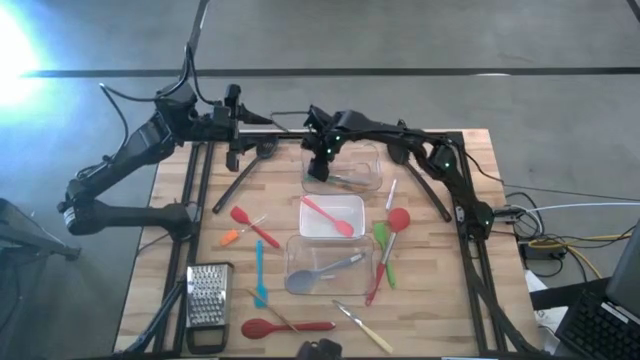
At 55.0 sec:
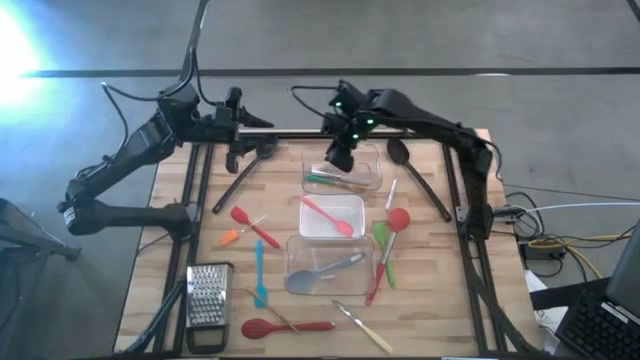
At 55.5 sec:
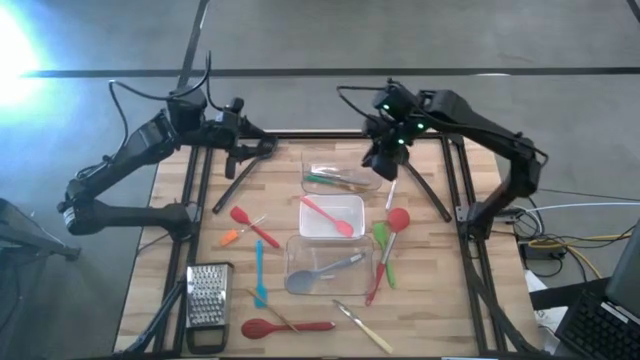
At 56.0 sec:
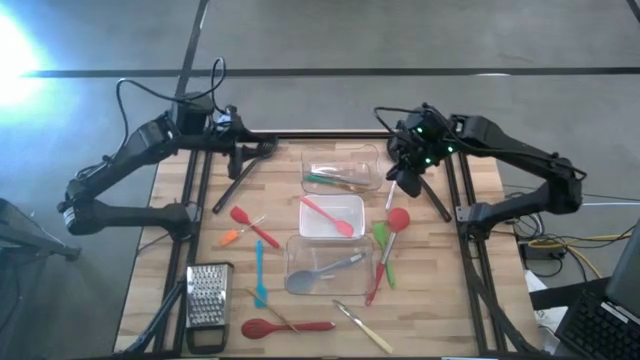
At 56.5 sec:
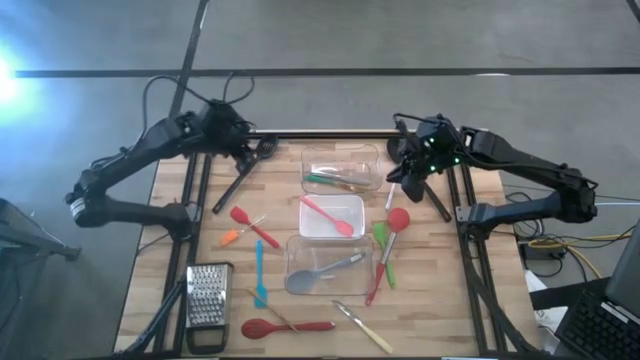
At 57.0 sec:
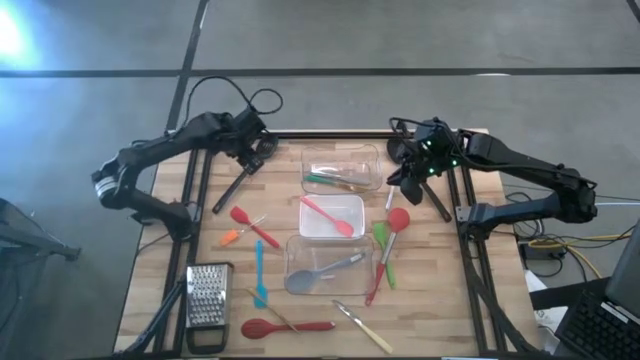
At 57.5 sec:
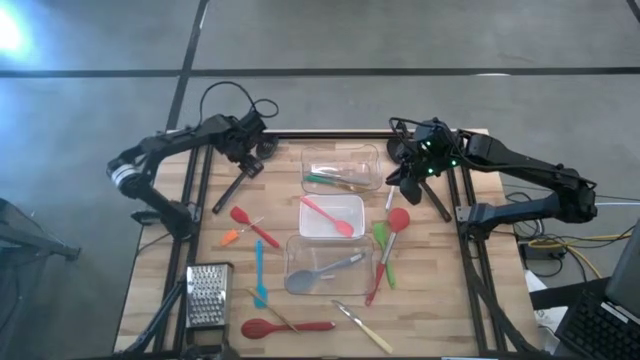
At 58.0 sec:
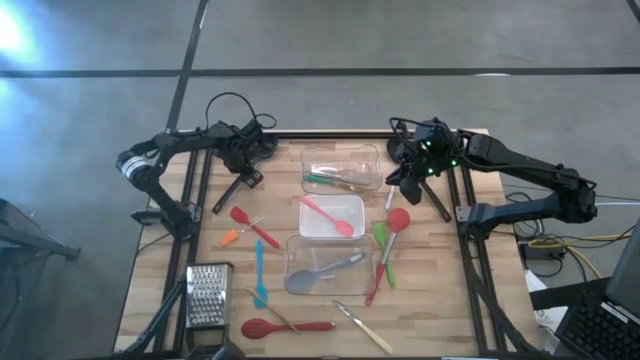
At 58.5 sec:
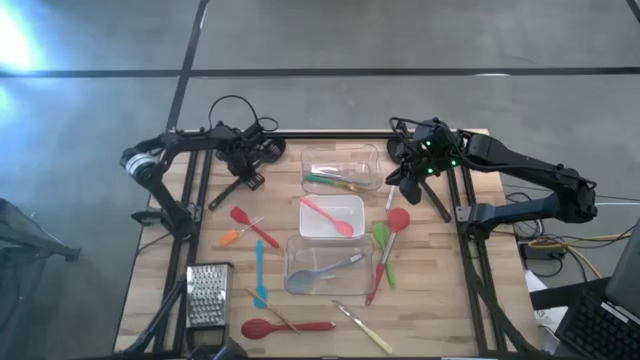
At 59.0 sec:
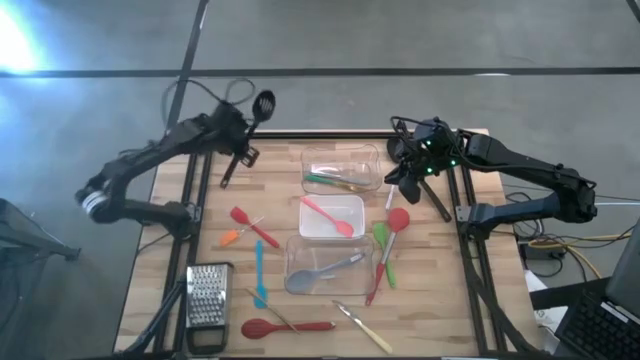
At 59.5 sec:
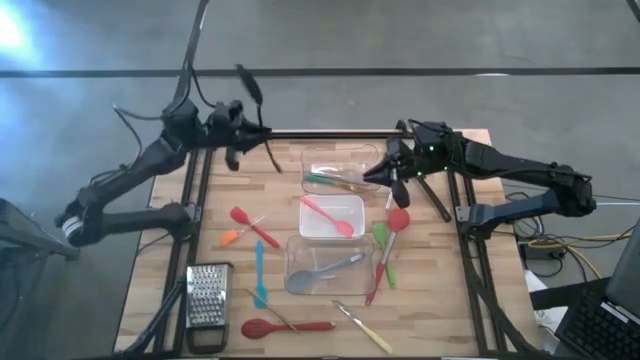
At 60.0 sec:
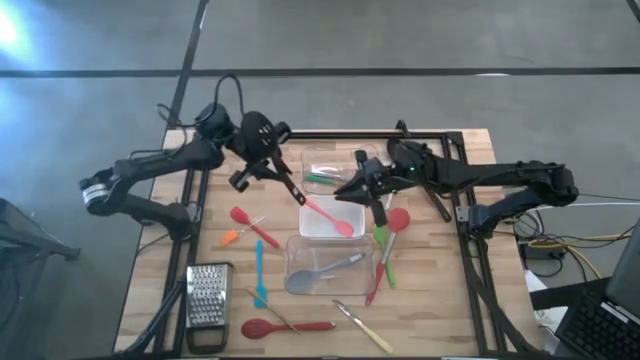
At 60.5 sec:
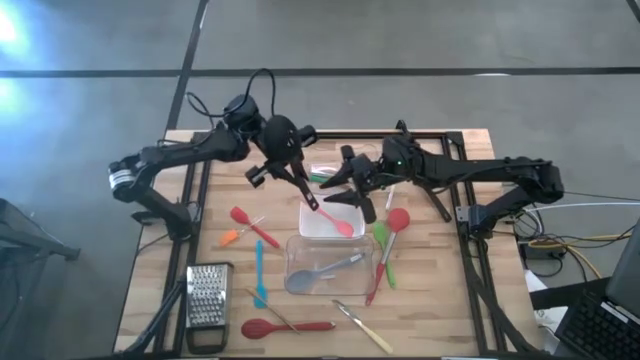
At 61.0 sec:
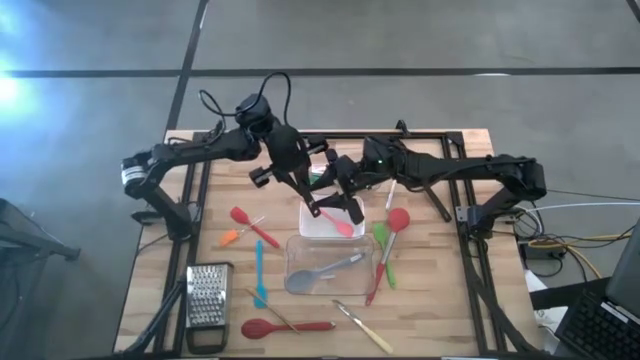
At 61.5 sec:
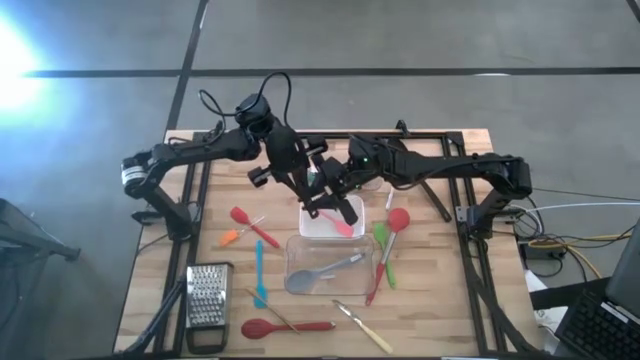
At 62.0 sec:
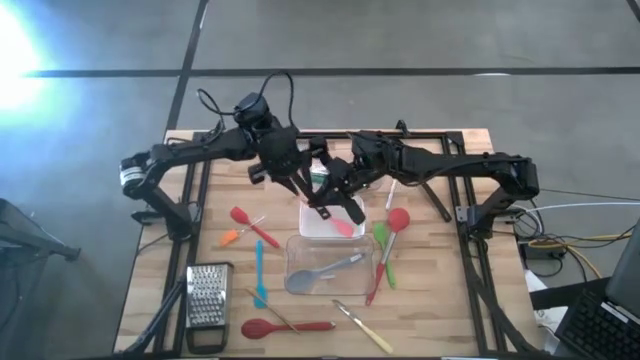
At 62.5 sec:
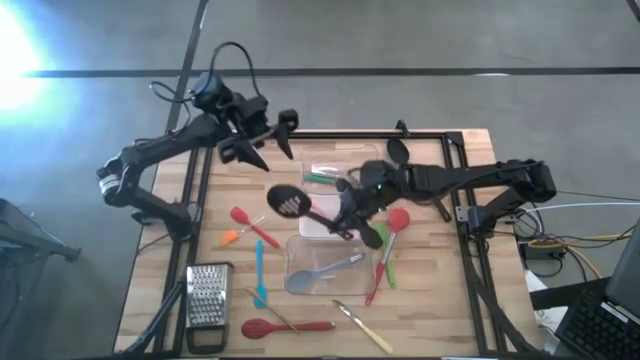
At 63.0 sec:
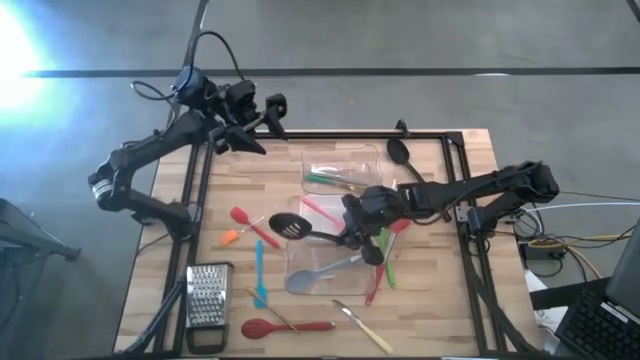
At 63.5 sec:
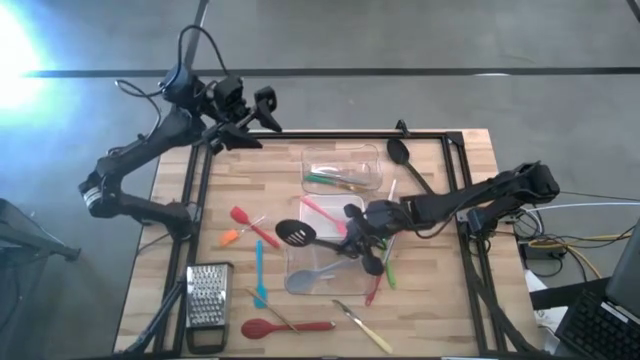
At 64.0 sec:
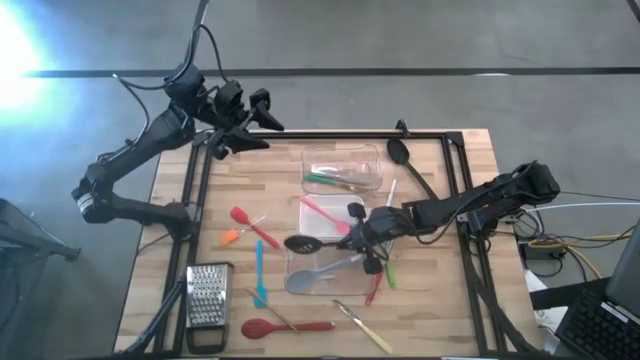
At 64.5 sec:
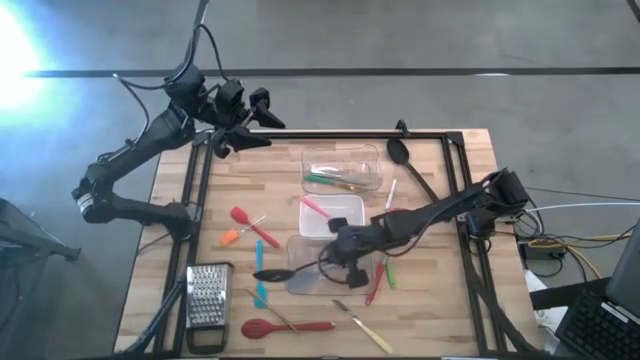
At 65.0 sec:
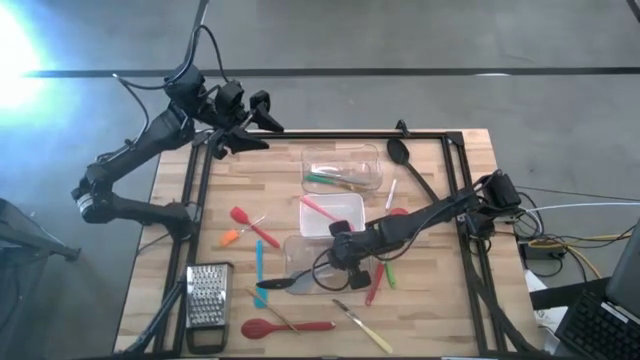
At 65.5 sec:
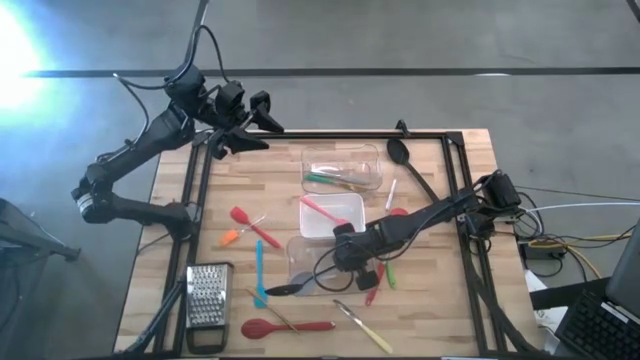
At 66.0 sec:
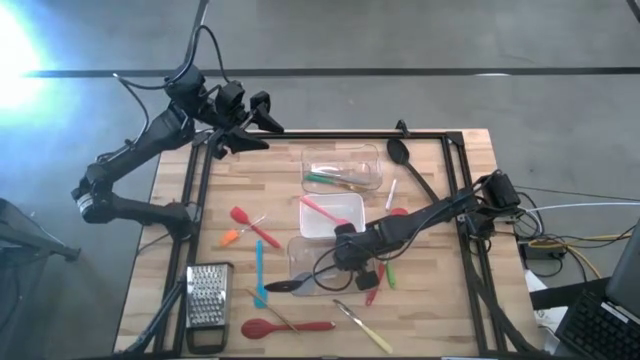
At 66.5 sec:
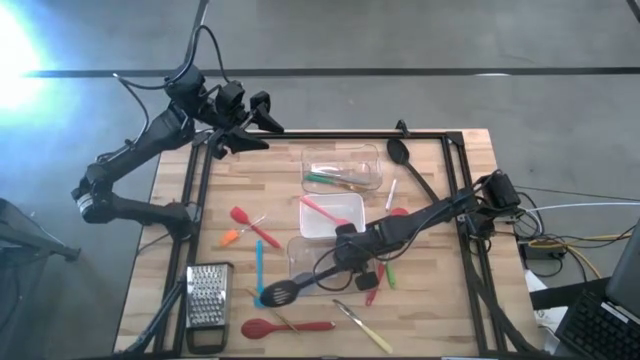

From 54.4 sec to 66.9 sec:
Task: Pick & Place Kitchen Items
Put the black slotted spoon into the bottom transparent bin

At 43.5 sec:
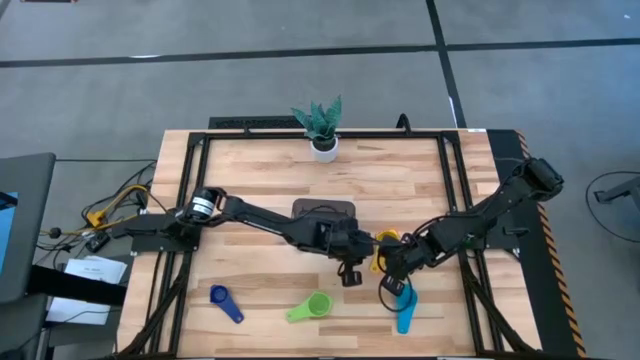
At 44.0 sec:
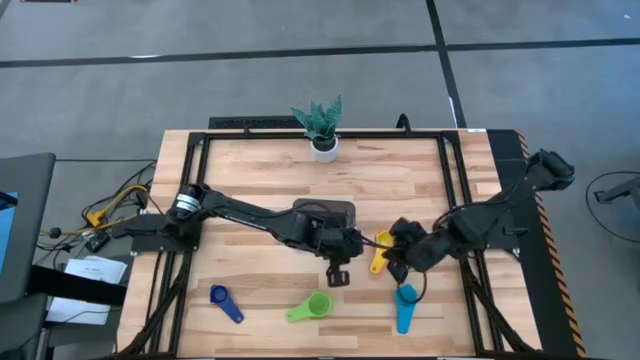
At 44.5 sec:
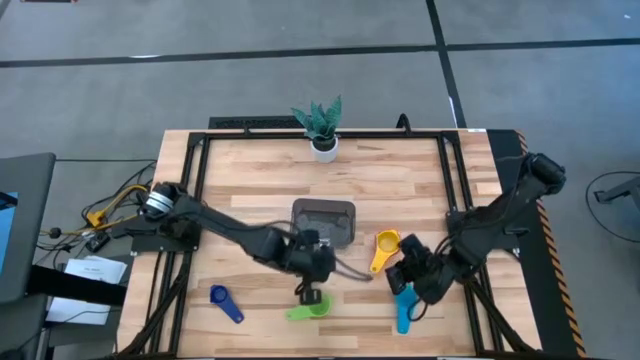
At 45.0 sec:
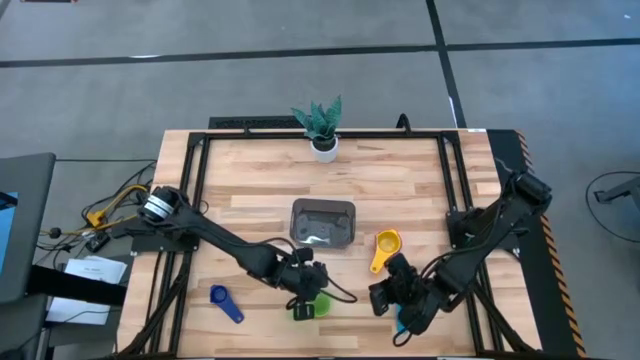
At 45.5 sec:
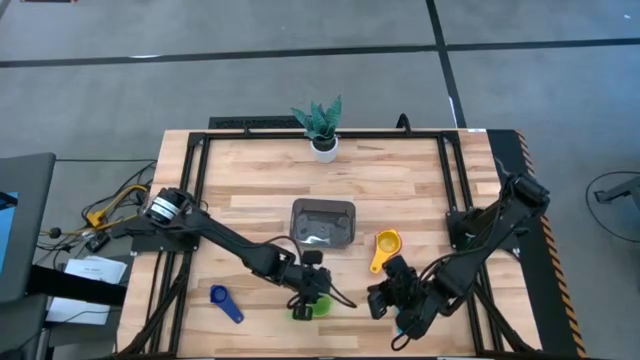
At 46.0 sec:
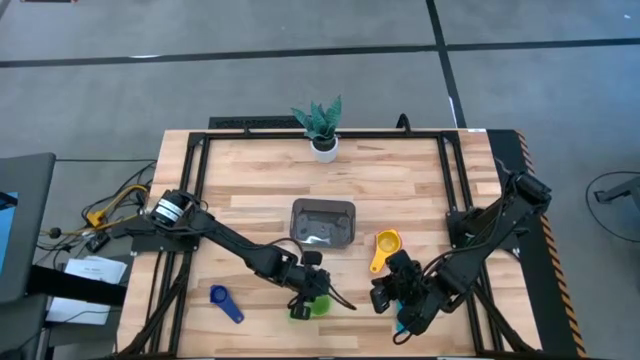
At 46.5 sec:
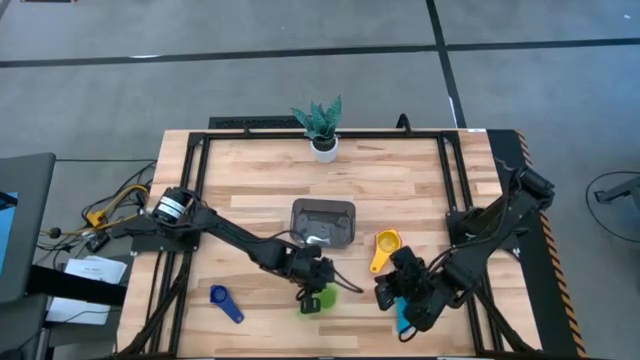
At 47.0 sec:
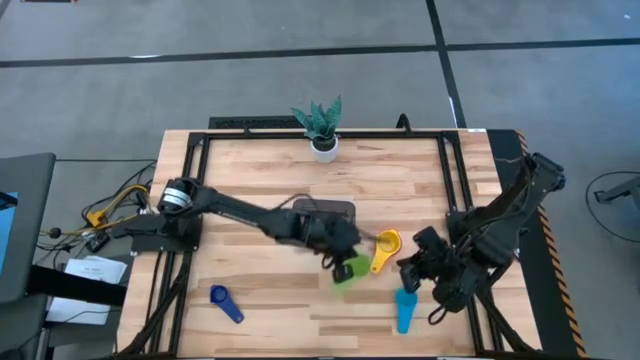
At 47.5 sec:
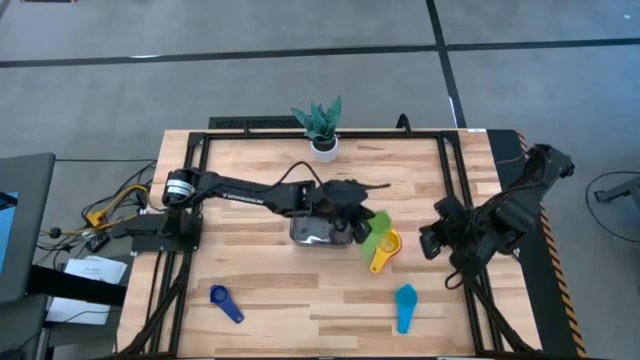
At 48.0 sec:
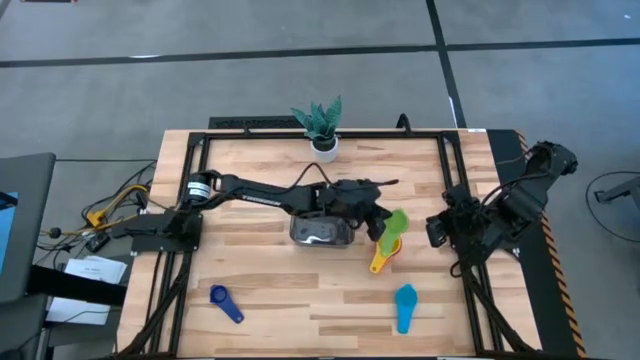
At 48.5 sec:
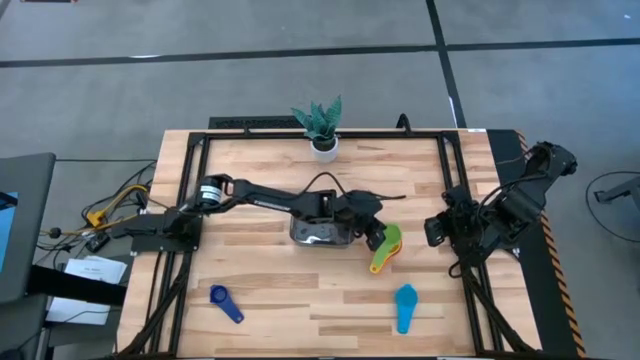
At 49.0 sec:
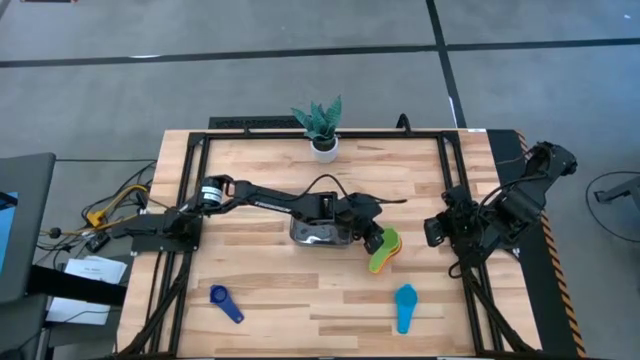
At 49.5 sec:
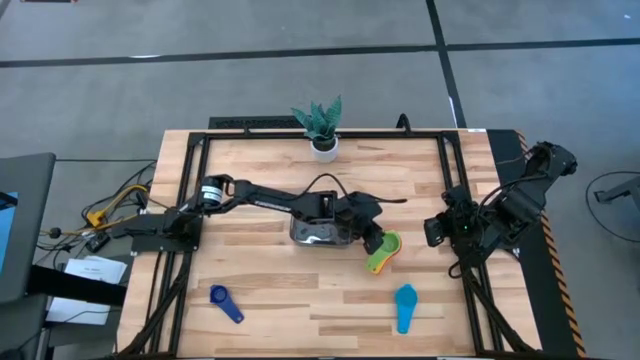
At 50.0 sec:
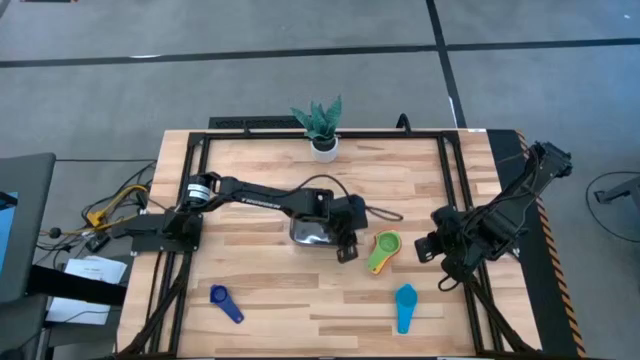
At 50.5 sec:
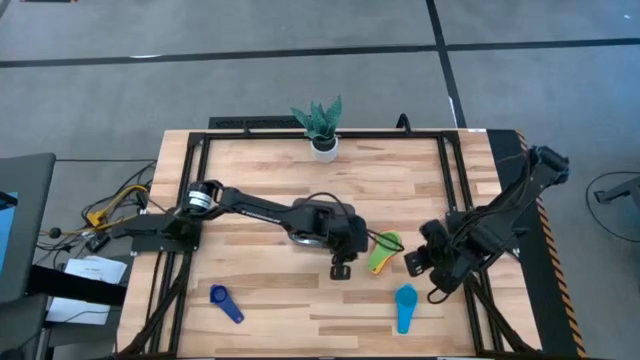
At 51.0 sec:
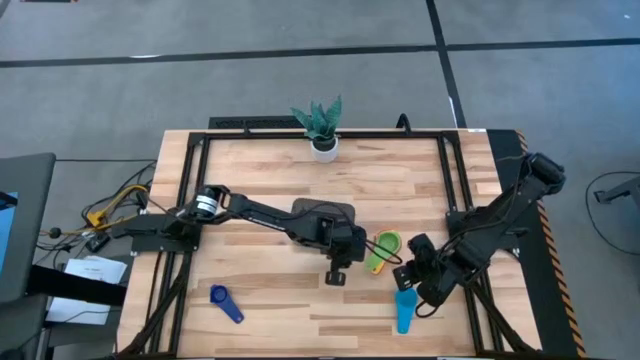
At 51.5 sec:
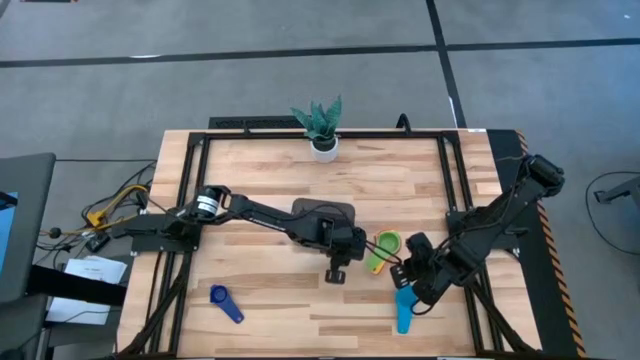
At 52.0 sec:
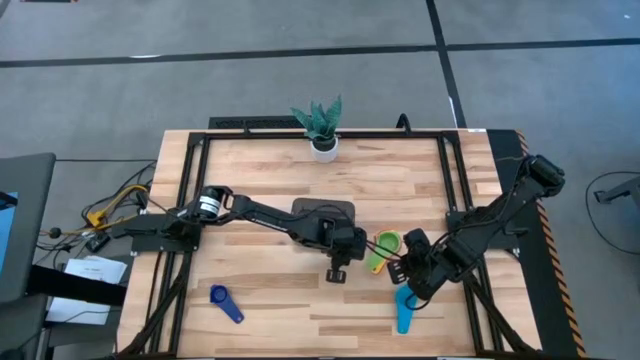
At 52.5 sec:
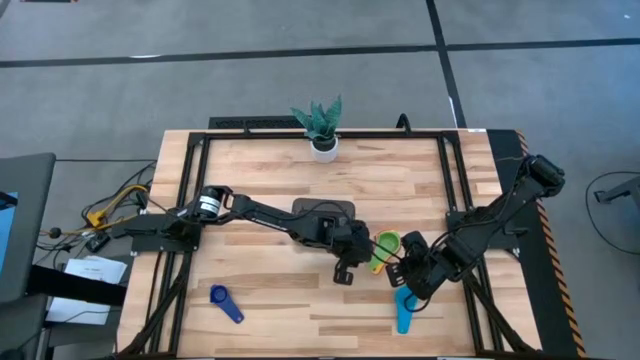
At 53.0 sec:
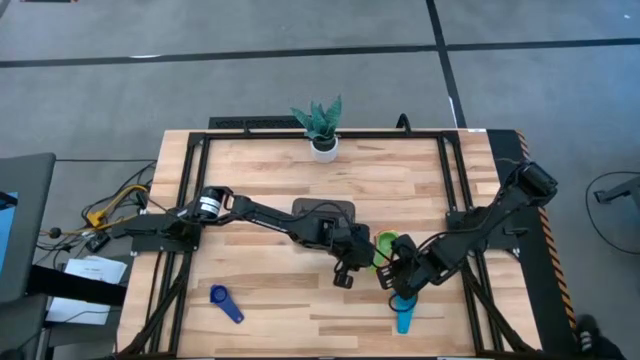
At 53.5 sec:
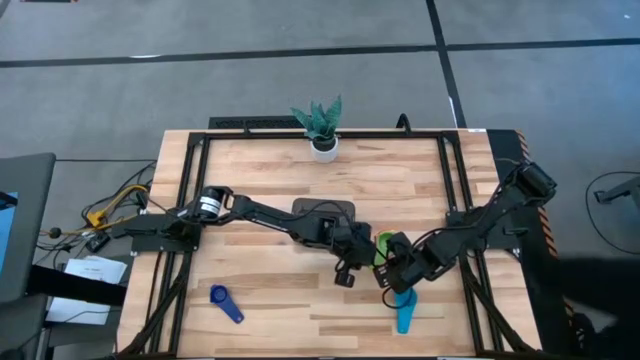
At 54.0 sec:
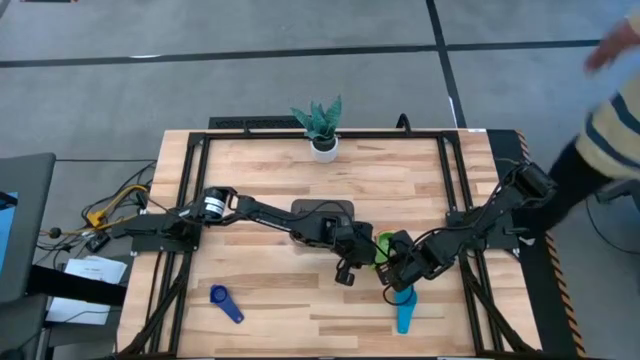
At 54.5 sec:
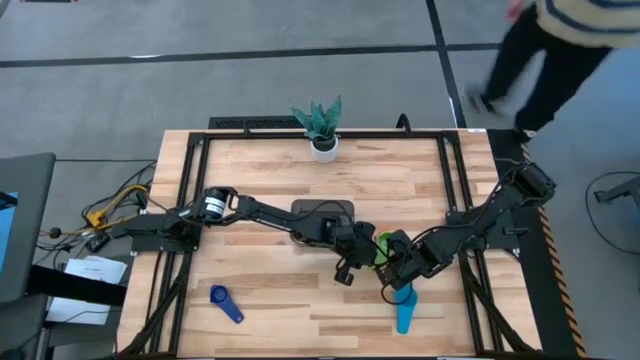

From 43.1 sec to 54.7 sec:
Task: Nest measuring cups in basket
Stack the green measuring cup on top of the yellow measuring cup
